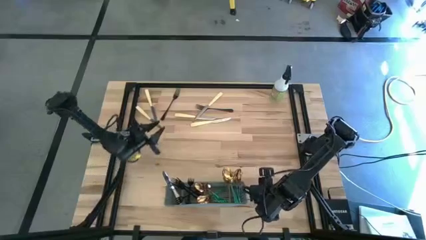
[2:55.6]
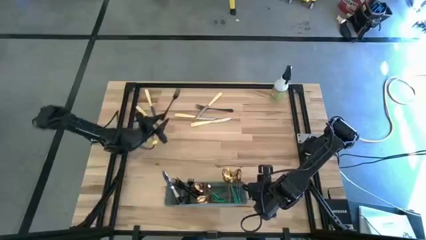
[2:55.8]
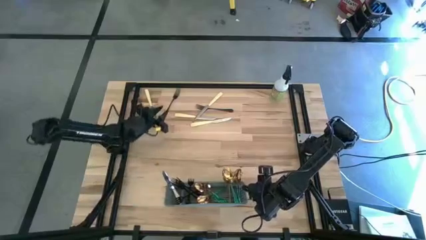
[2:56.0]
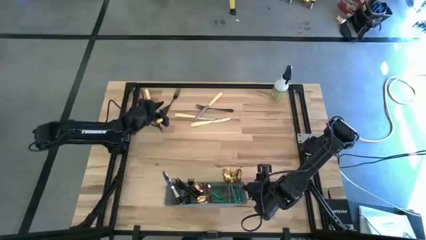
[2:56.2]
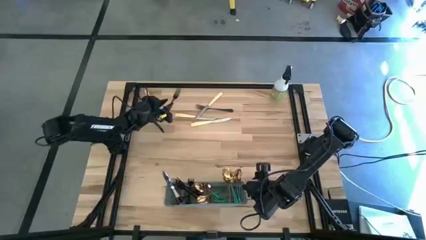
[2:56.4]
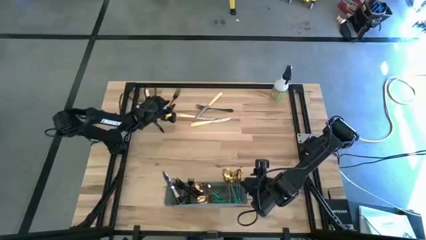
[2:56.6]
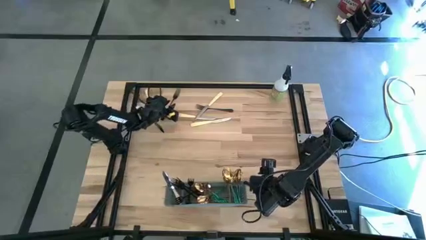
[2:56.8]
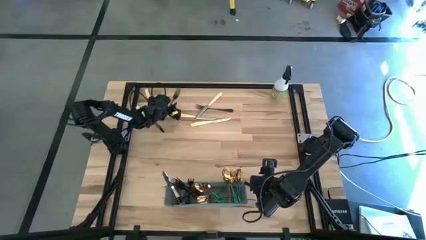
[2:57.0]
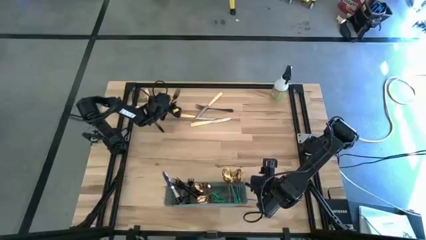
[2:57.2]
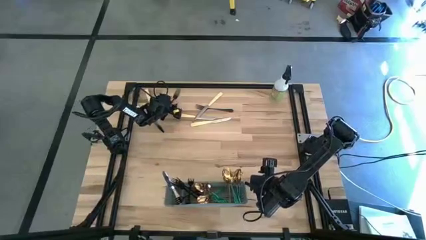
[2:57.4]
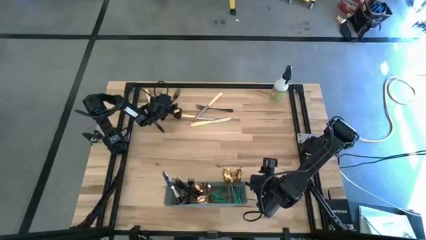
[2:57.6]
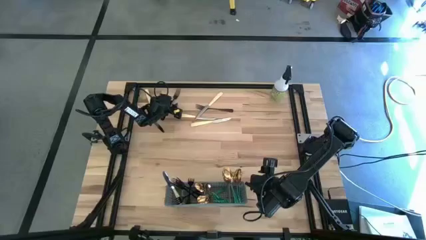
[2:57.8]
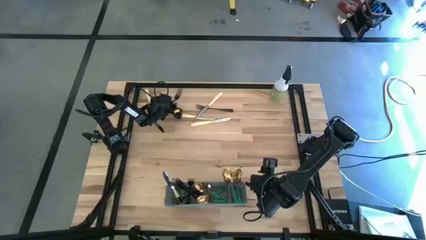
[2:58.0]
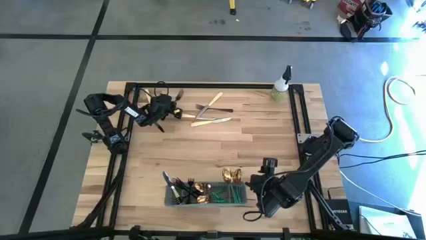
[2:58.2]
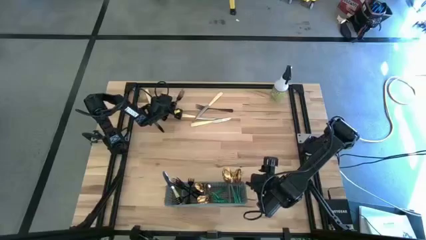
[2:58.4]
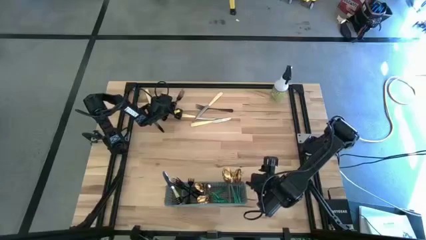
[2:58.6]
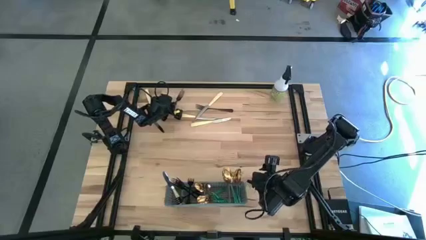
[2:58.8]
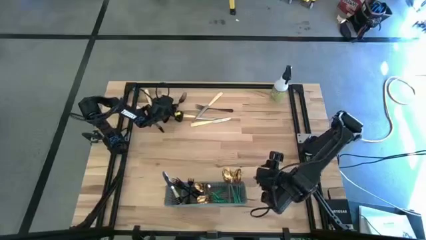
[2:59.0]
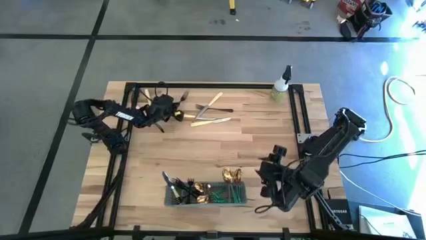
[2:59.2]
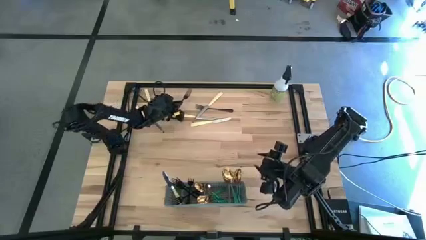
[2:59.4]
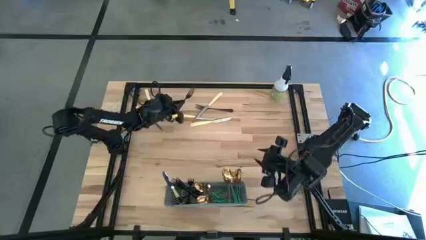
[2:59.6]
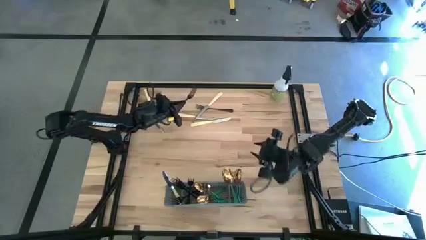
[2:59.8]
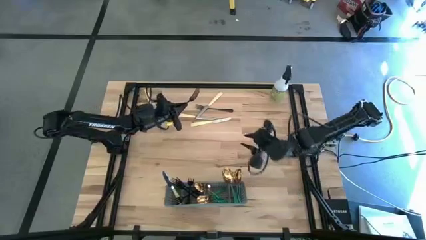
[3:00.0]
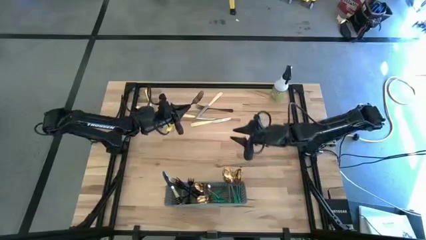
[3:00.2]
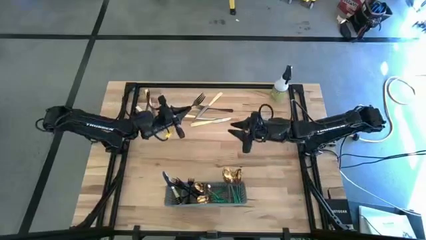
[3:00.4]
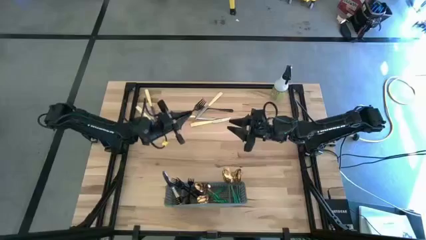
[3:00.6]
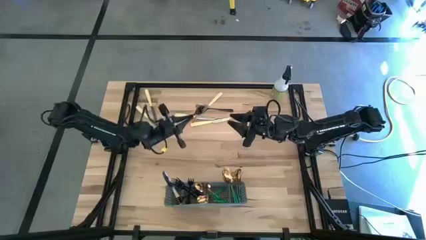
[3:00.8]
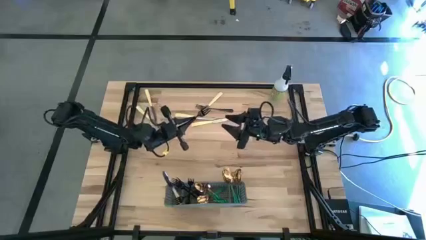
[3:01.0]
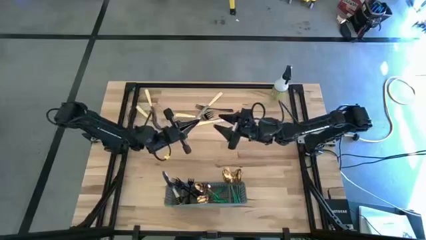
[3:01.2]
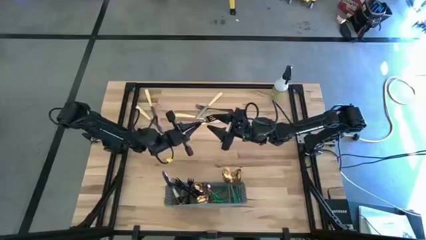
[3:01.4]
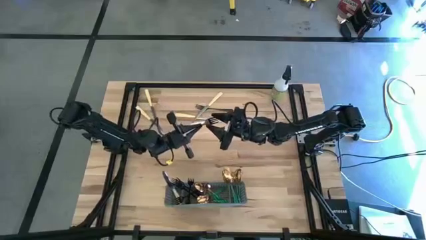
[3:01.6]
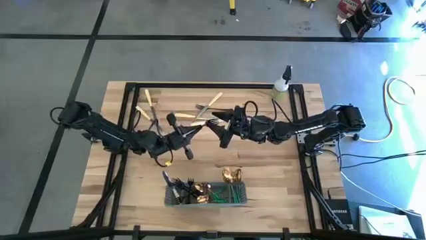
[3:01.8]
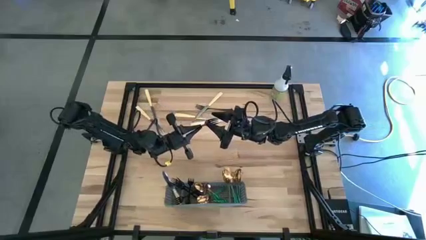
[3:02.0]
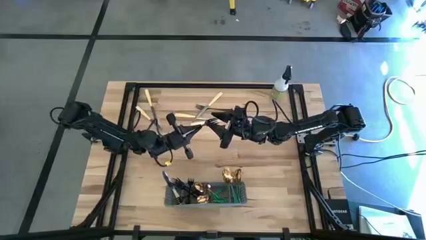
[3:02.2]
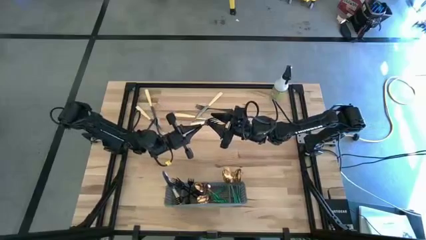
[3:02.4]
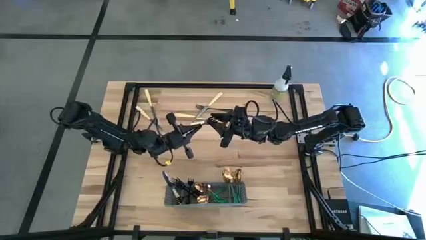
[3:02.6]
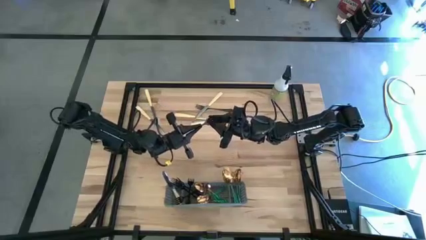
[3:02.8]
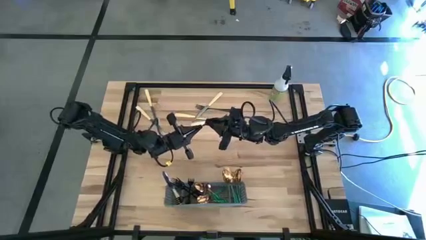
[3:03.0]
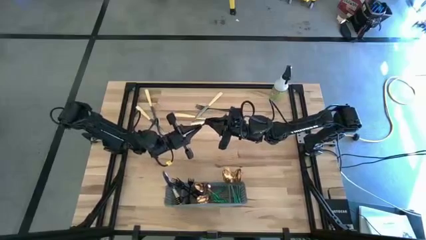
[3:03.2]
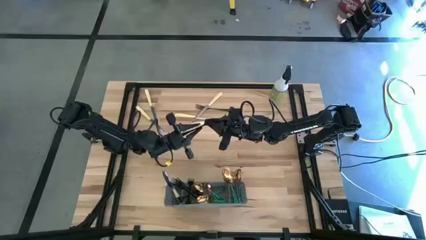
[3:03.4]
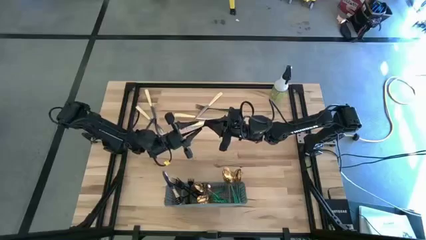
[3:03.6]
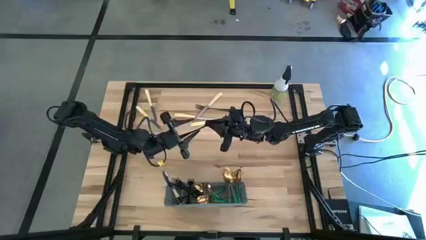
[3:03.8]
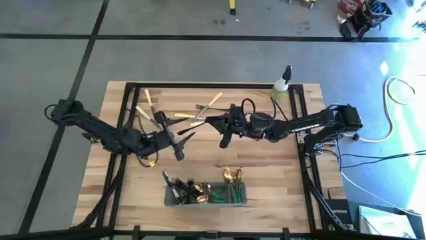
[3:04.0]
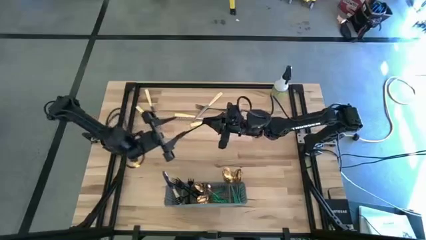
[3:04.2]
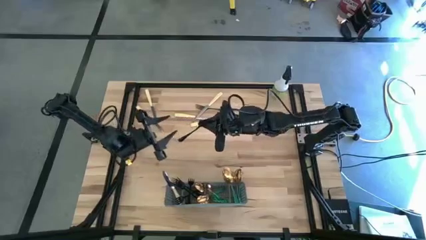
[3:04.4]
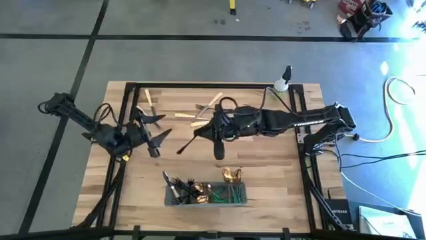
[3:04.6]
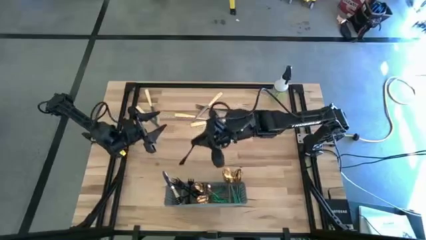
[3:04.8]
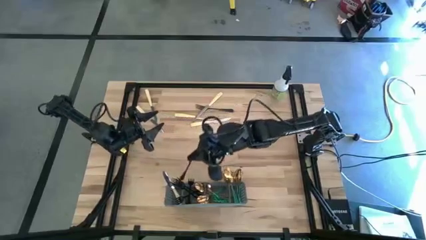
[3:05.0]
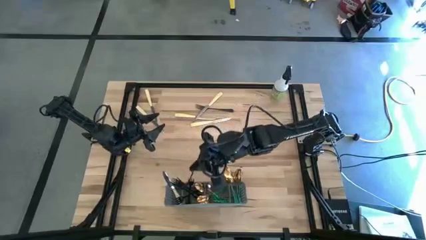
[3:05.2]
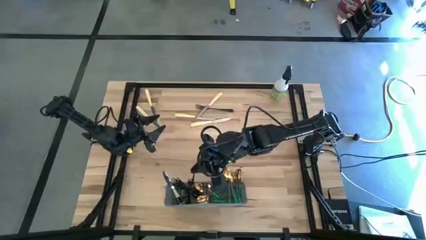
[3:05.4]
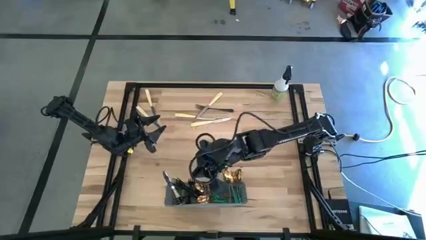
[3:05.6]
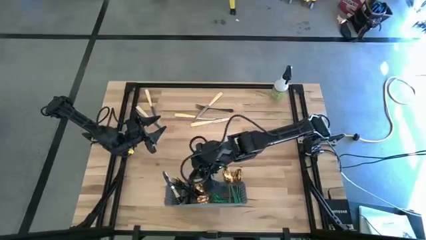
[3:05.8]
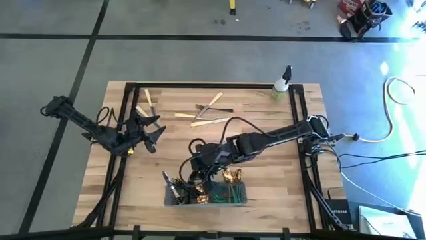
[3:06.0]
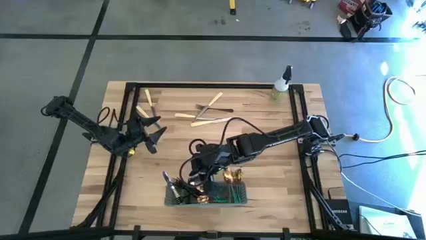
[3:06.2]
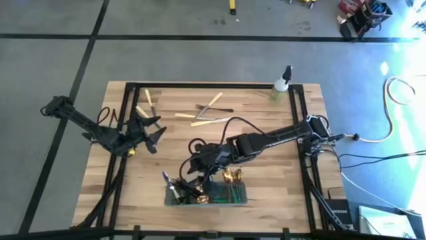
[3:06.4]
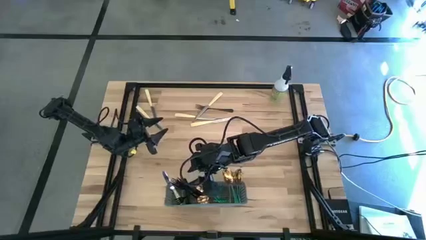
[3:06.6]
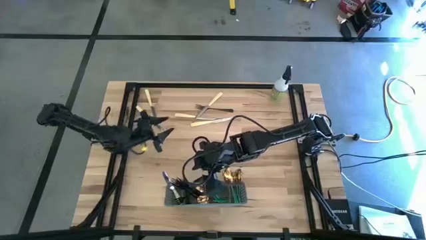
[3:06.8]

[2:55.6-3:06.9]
Task: Sort silverware
Put the left black fork into the gray cutlery rack

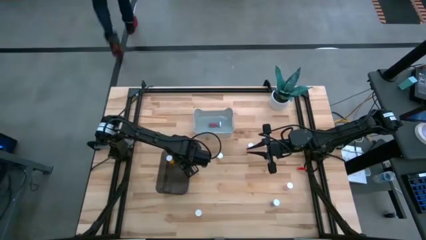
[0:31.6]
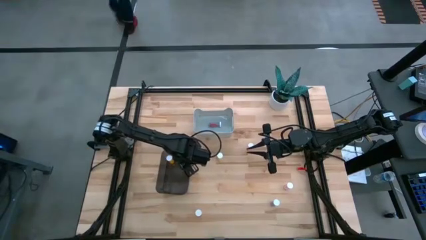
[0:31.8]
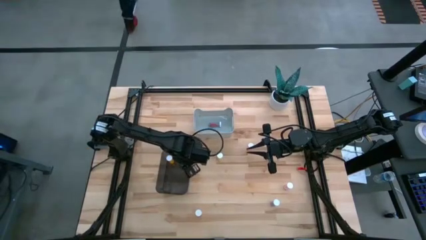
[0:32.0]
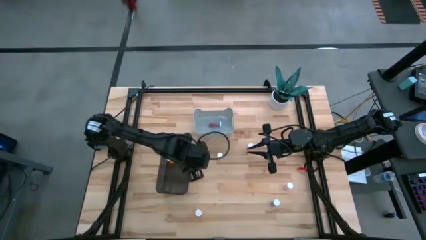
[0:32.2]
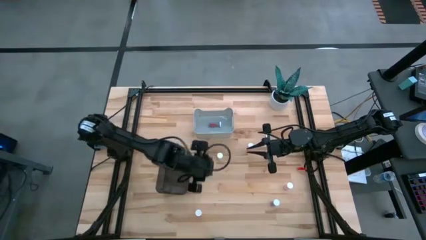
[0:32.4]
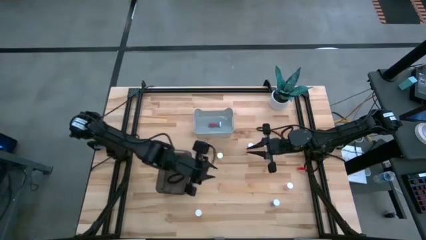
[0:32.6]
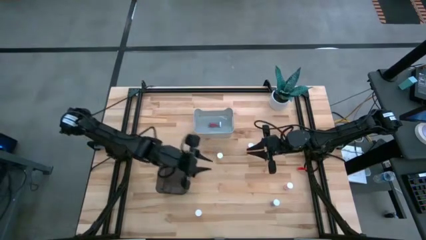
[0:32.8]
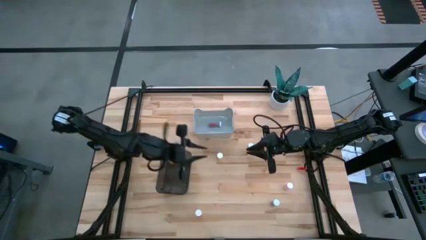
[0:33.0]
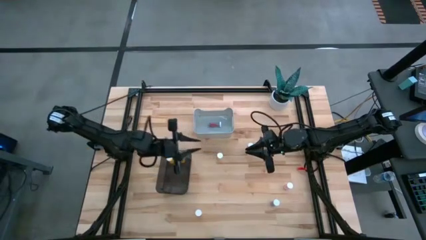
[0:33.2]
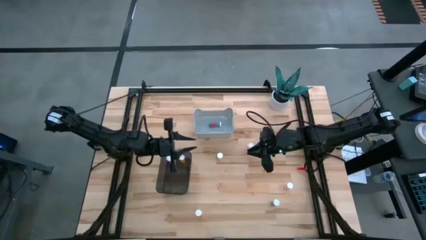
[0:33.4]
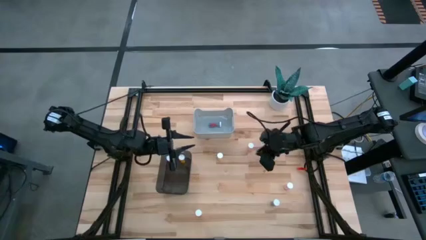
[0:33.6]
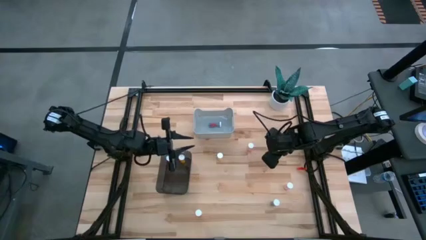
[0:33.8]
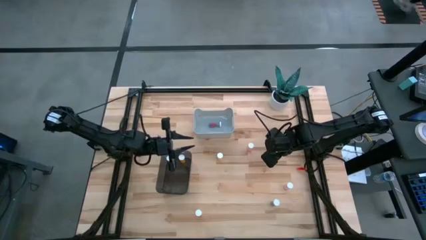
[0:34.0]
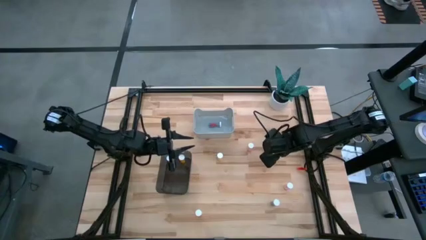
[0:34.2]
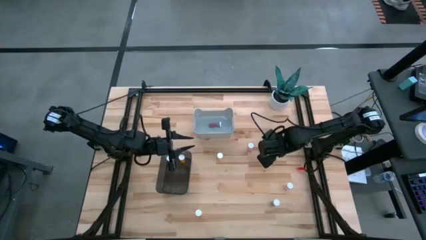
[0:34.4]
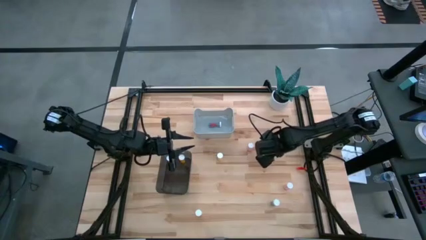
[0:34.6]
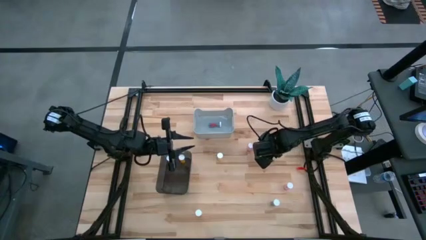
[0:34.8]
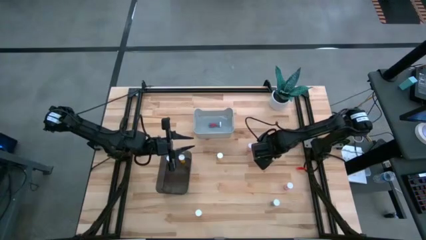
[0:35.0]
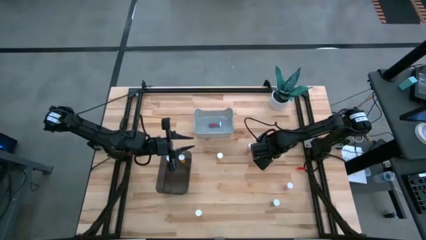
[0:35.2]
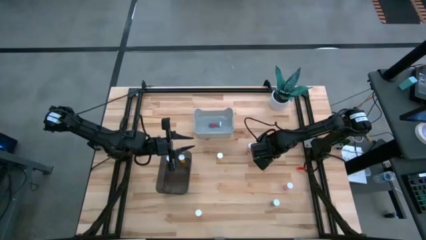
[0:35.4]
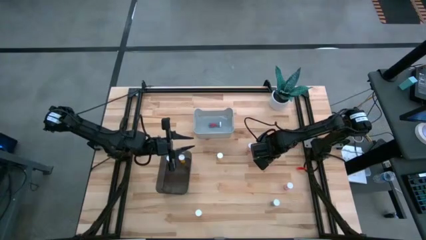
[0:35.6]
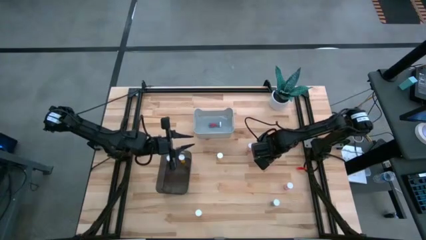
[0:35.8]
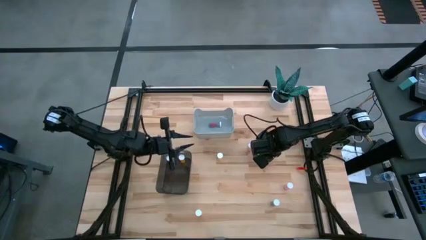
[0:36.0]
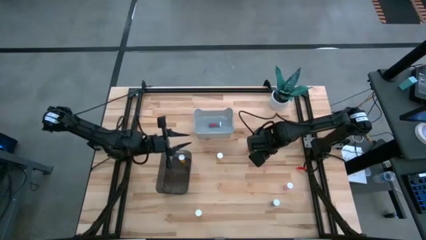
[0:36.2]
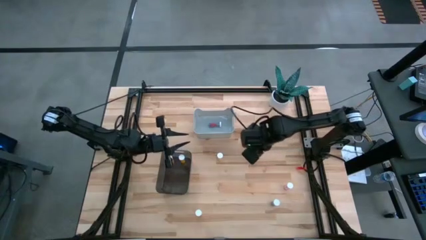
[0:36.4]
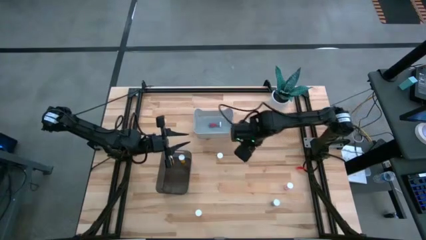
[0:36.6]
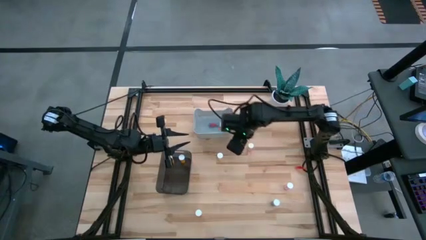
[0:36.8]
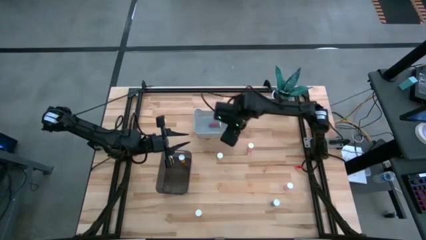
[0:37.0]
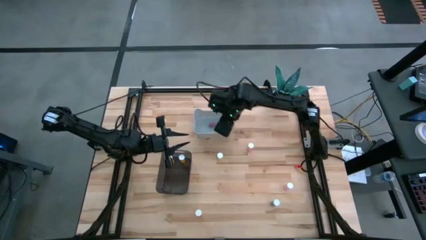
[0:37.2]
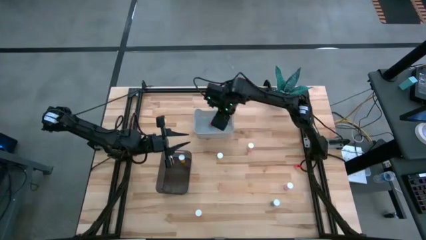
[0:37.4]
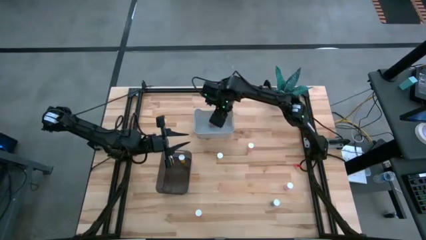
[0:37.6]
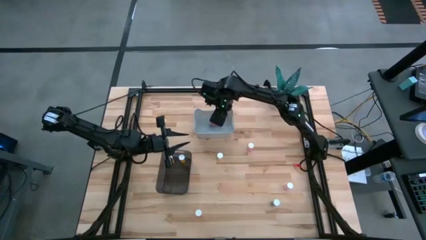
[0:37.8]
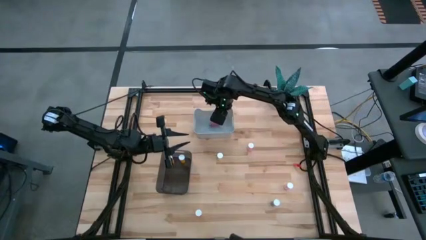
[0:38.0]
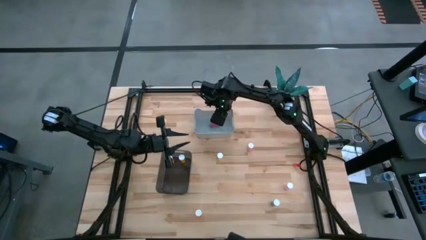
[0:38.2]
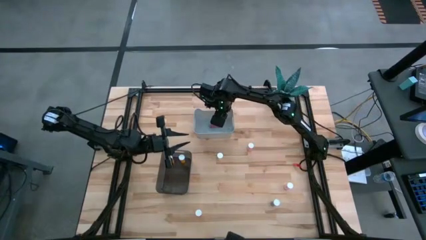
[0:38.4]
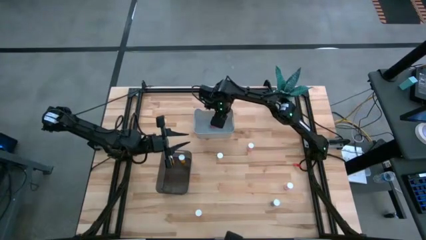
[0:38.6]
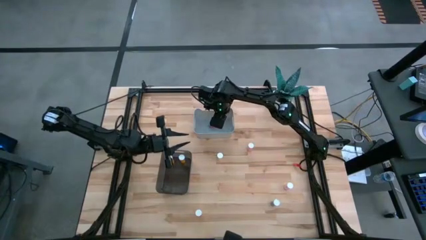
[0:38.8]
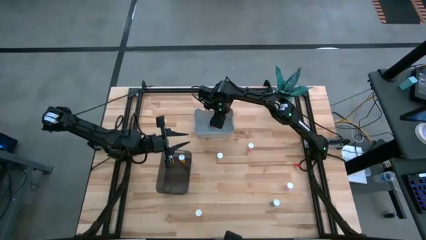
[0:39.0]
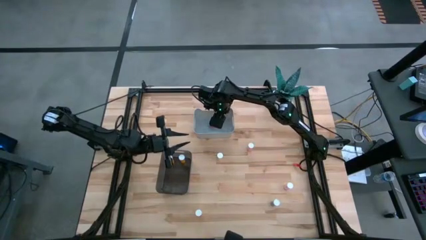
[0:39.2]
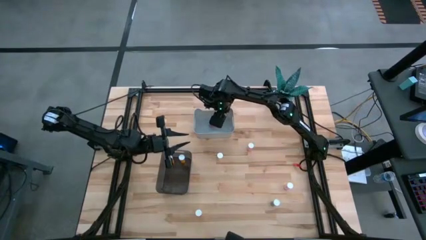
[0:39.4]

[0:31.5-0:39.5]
Task: Pick and place medicine bottles into bin by pill shape (circle, oval)
Put the green capsule bottle into the gray bin
